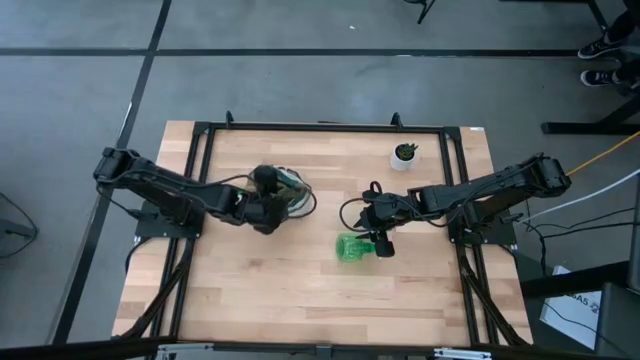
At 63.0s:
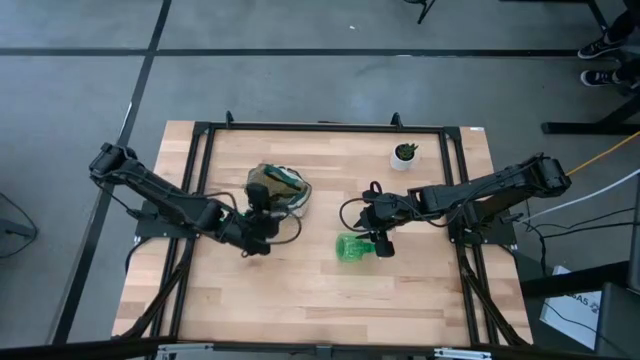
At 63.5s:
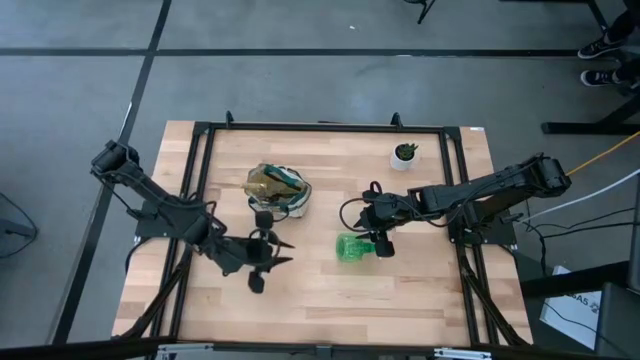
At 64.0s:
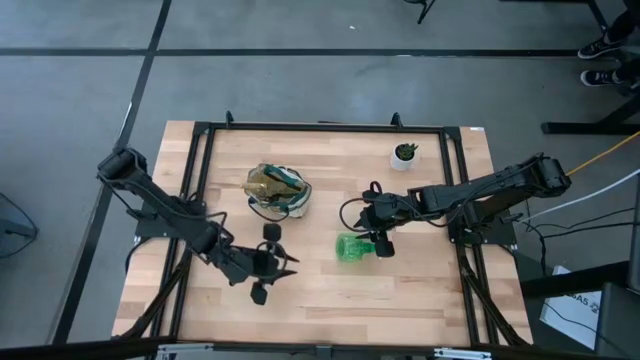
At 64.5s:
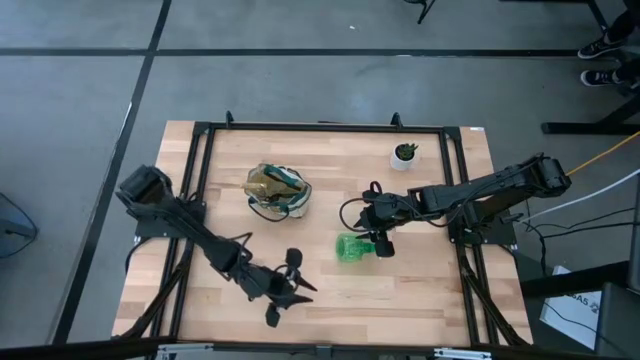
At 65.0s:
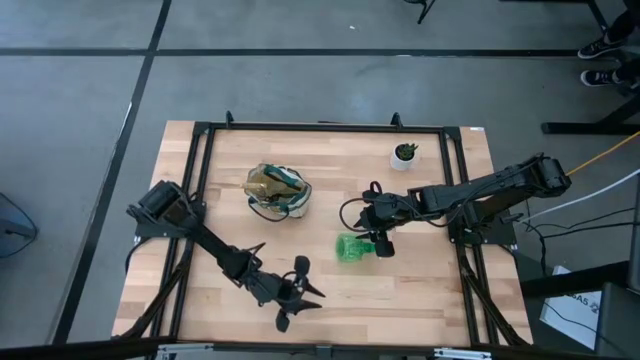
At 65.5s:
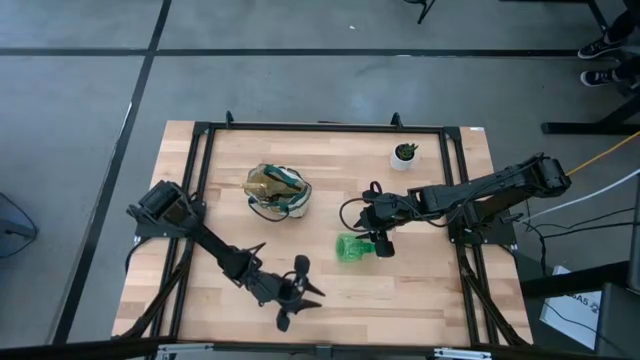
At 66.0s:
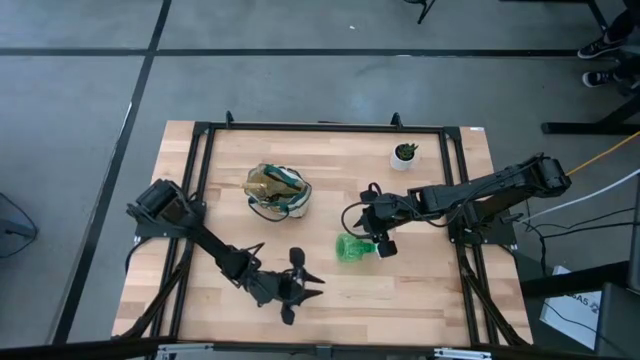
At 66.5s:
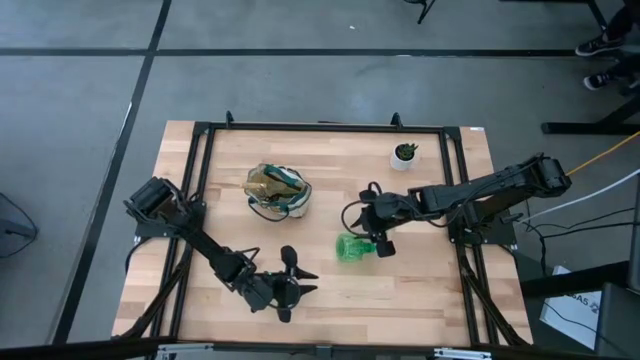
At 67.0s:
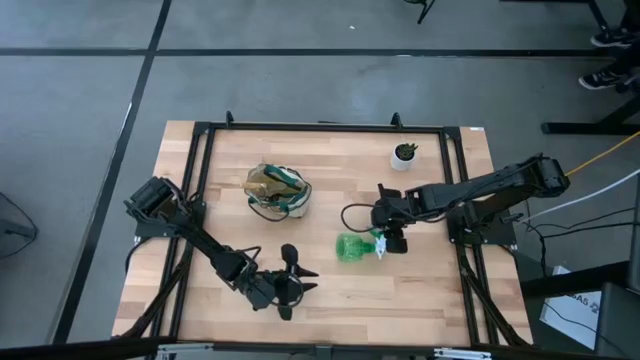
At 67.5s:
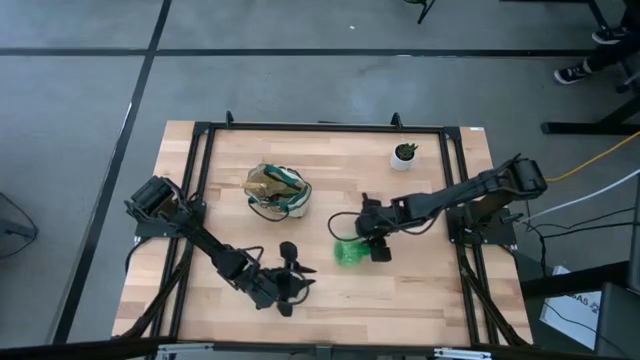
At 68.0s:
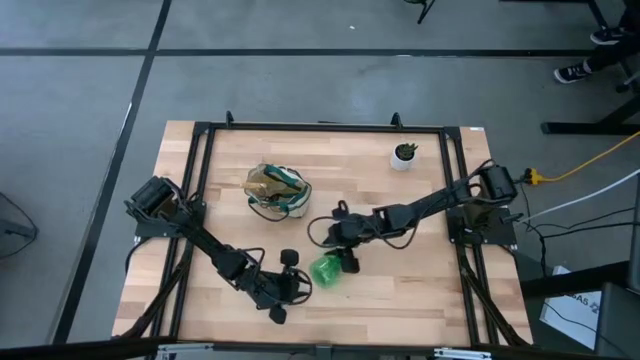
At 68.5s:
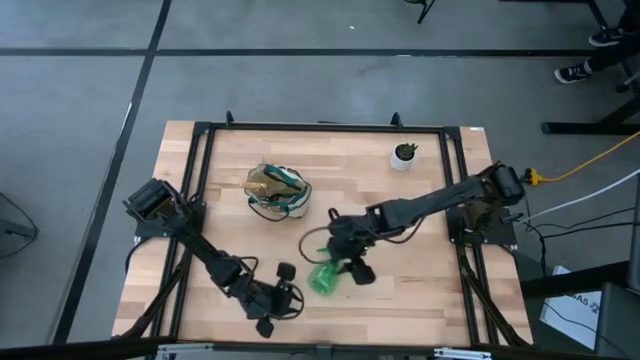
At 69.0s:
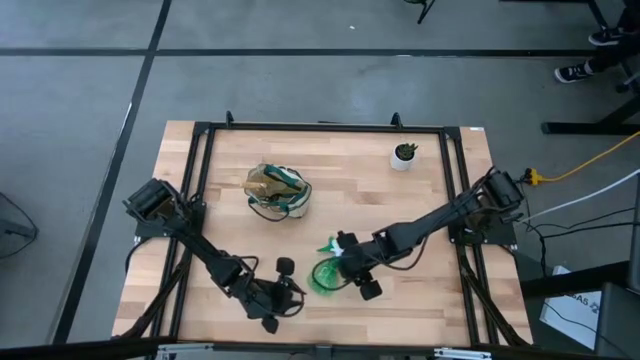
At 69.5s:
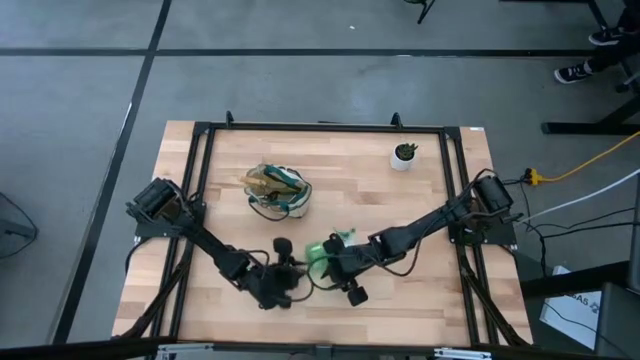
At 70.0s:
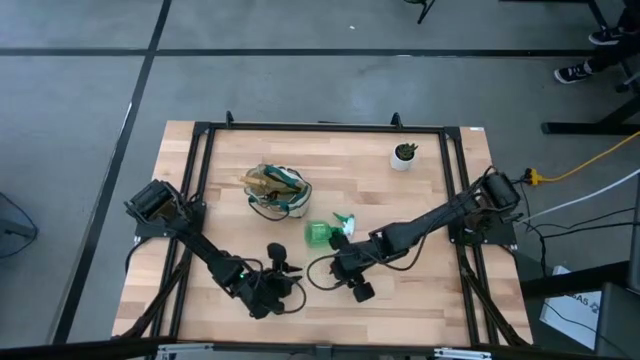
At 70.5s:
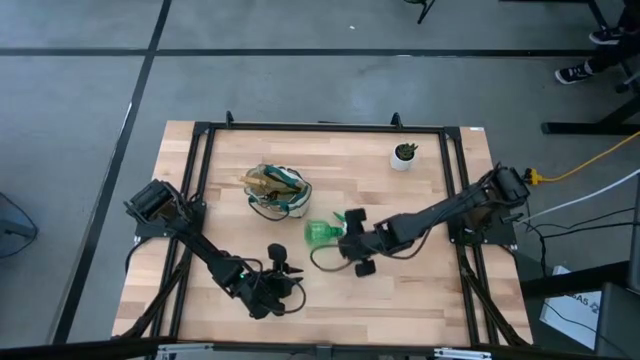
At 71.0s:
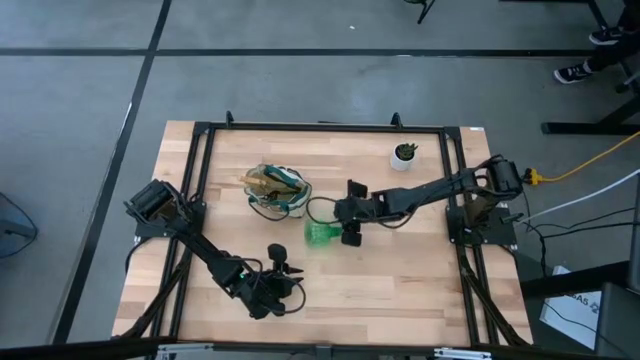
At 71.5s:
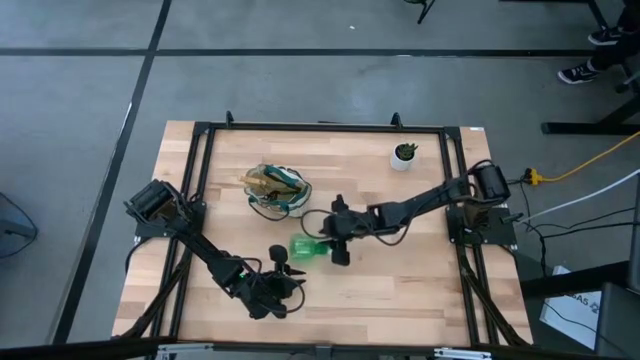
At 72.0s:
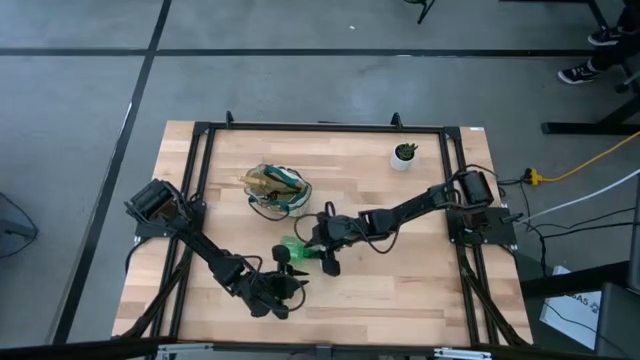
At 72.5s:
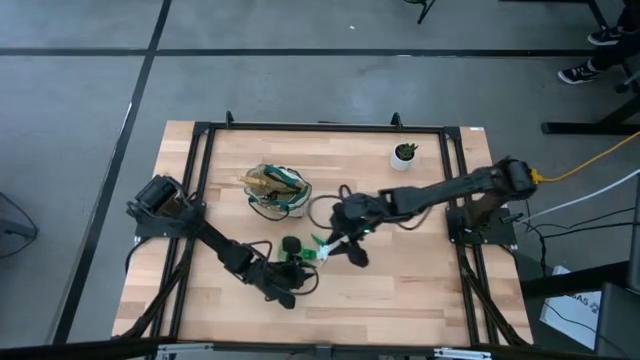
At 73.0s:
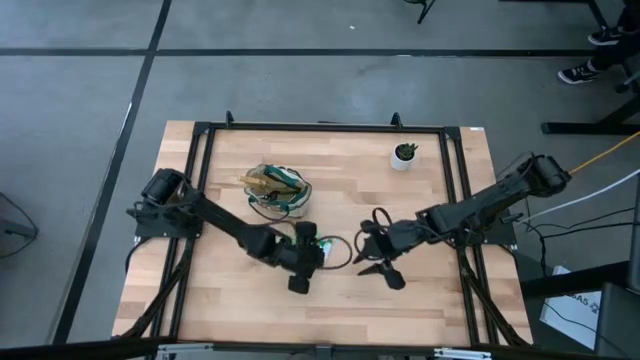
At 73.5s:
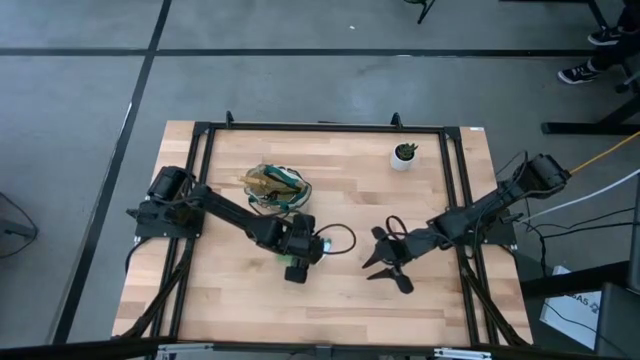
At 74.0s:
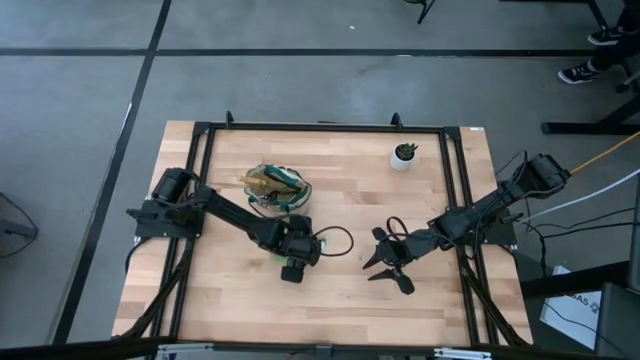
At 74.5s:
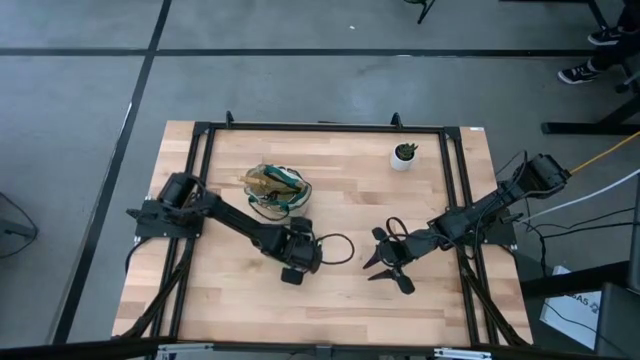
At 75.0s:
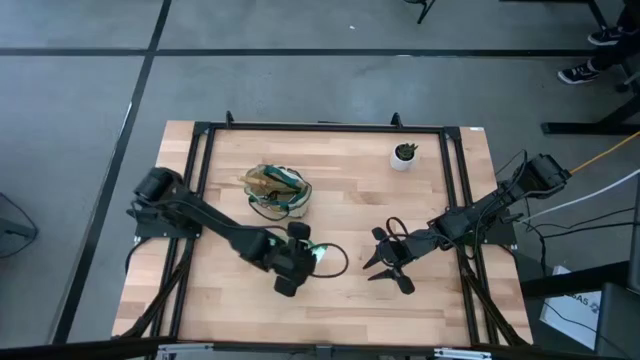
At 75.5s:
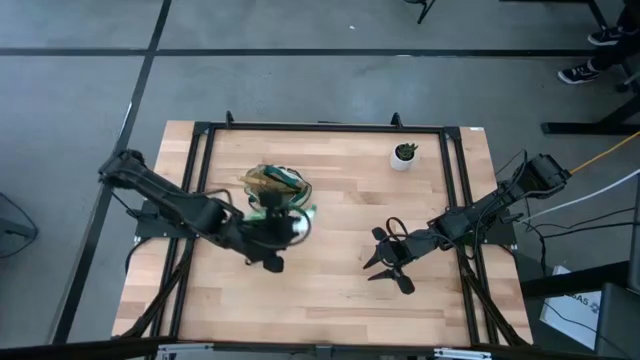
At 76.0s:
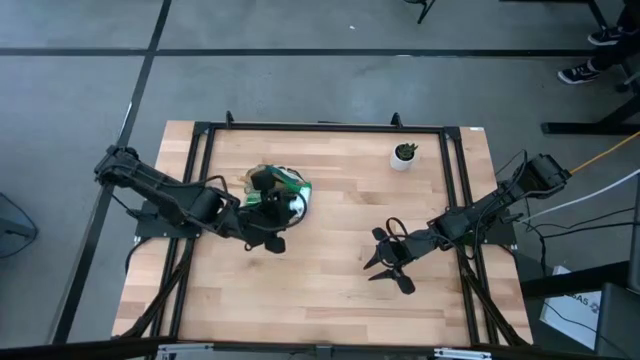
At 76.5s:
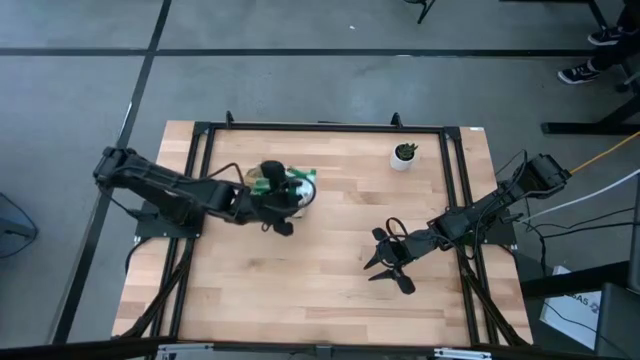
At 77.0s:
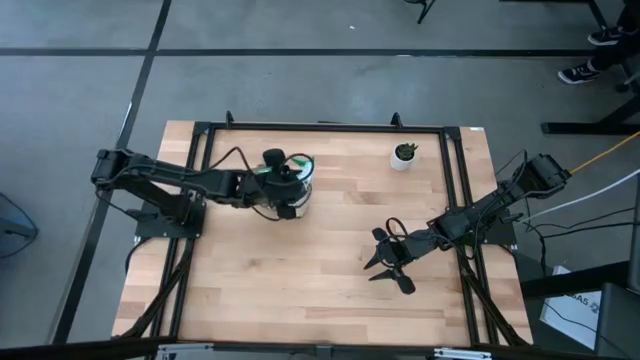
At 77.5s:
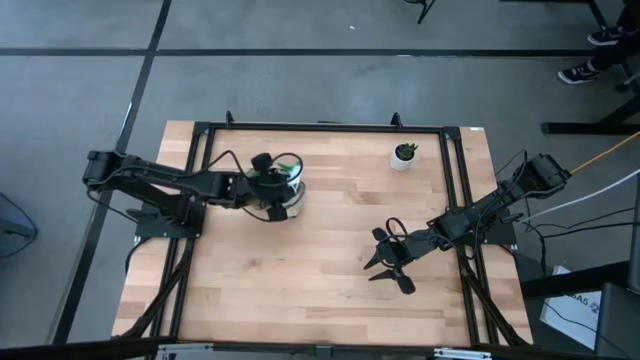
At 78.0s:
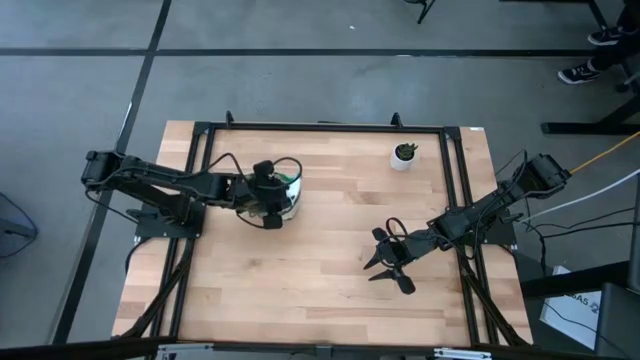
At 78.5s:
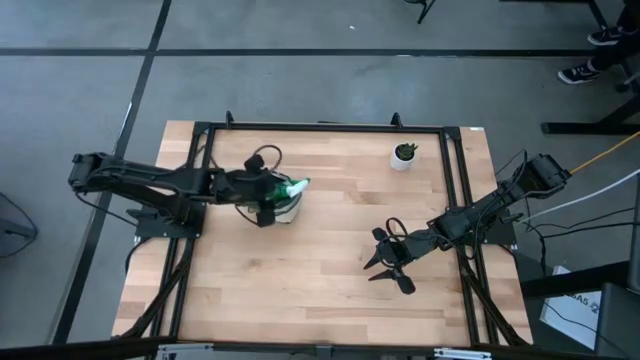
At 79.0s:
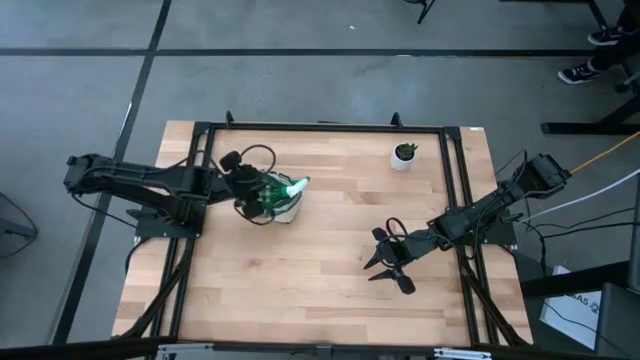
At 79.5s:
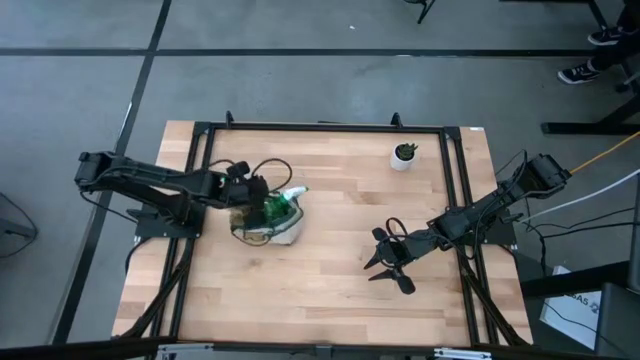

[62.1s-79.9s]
Task: Pick & Place Garden tools in Gardening bag
Put the spray bottle into the gardening bag
